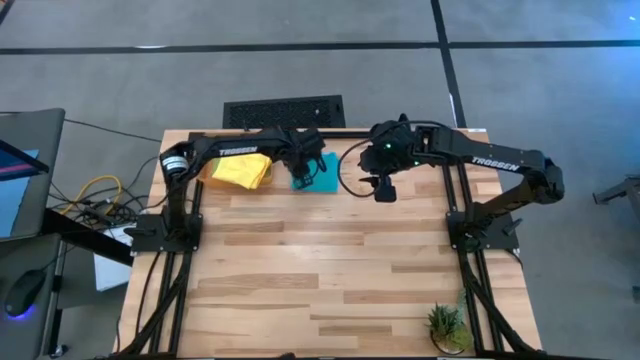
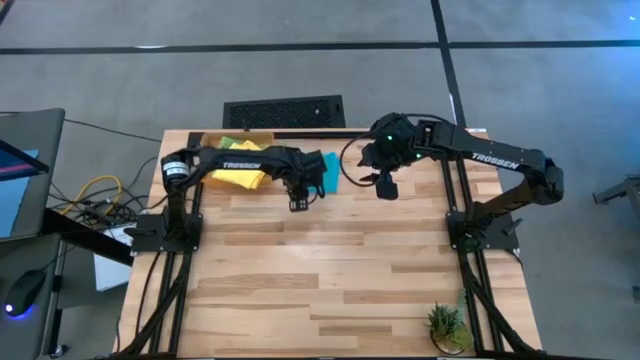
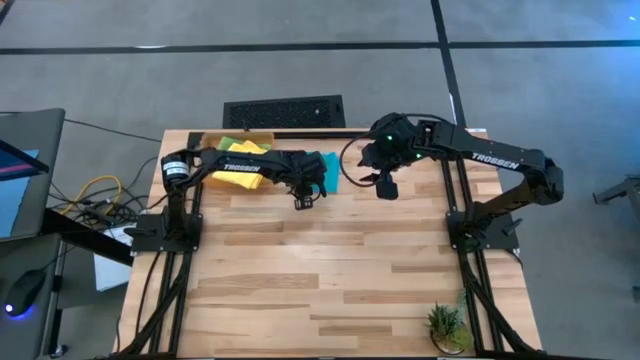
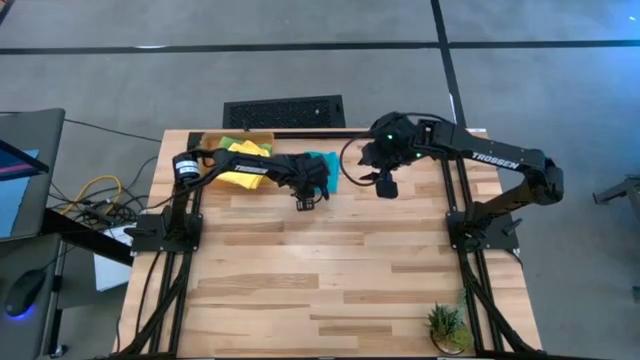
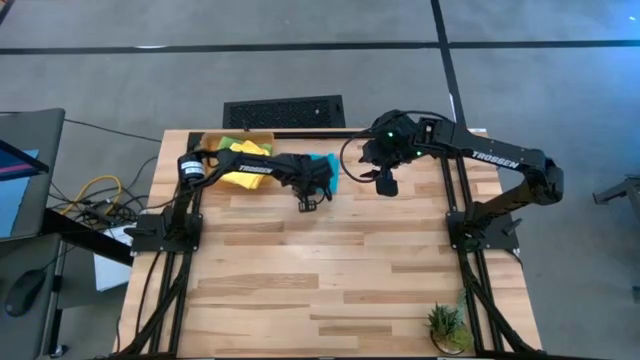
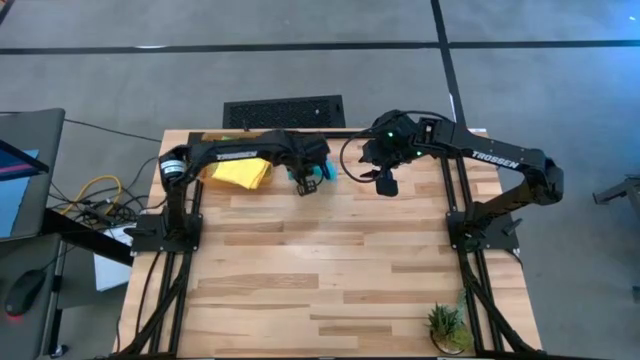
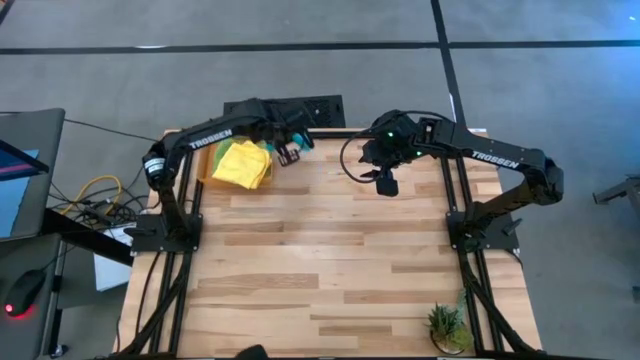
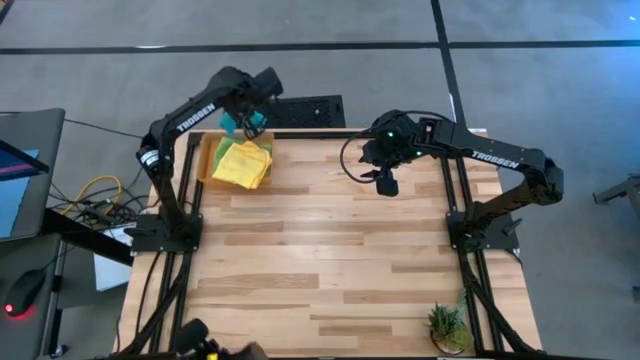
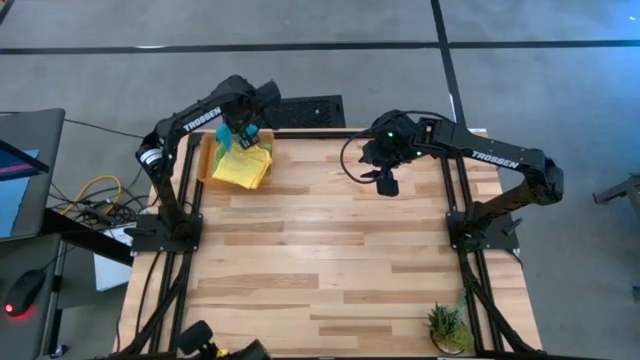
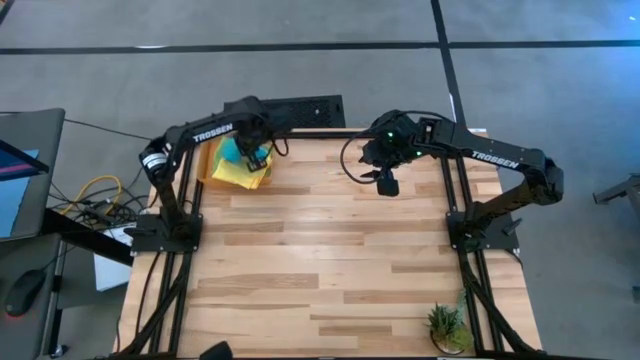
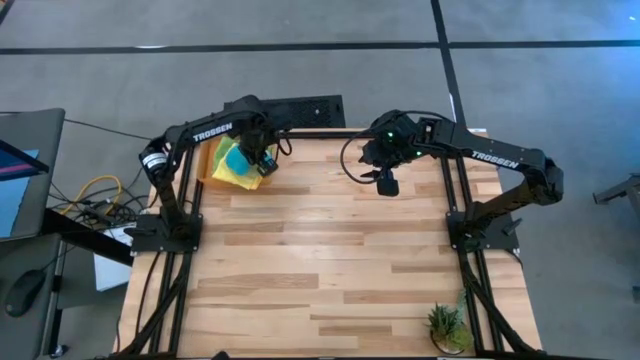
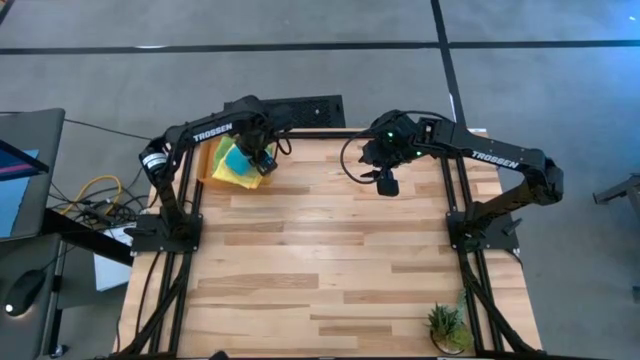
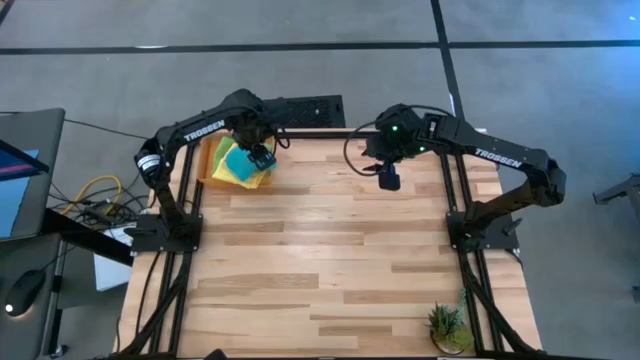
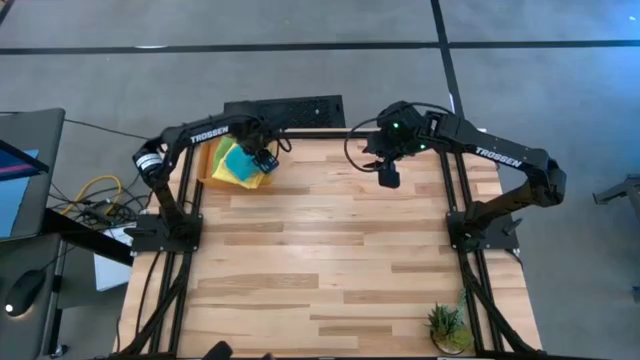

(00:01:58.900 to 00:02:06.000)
Task: Fold microfiber towels
Stack the blue microfiber towel on top of the yellow microfiber towel

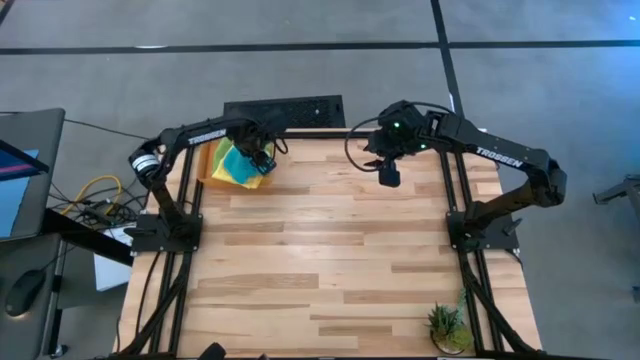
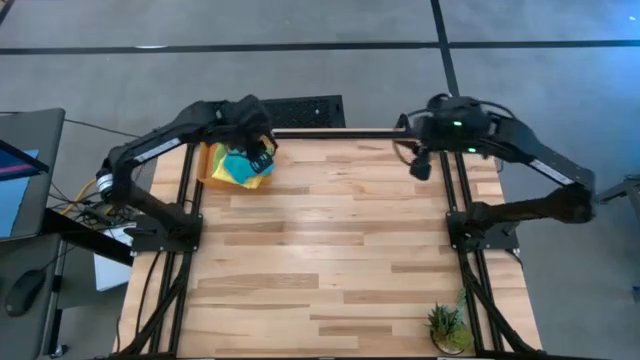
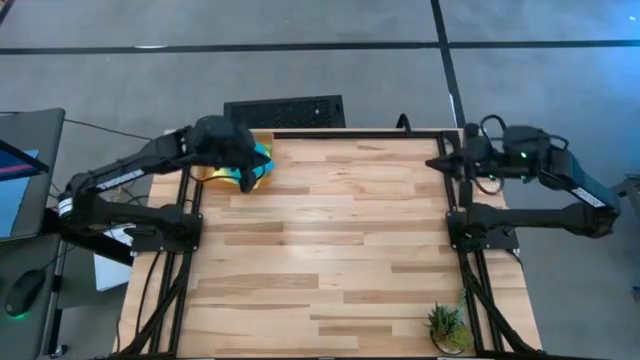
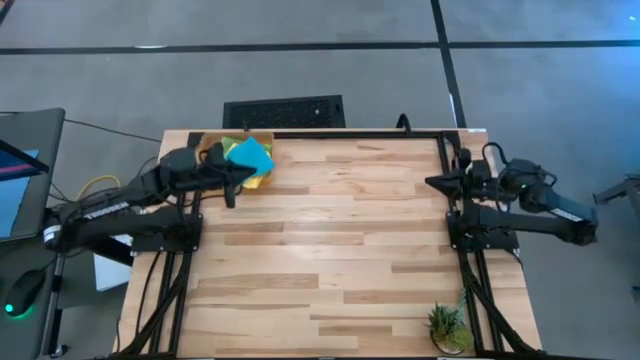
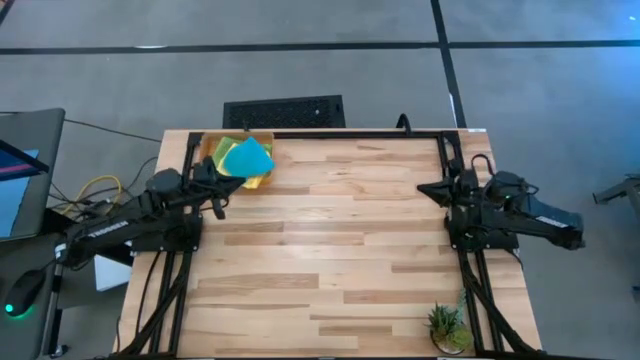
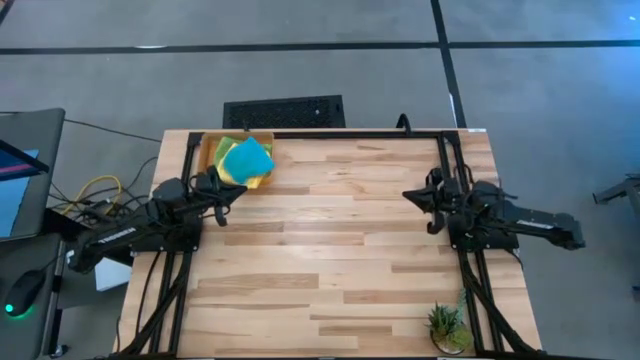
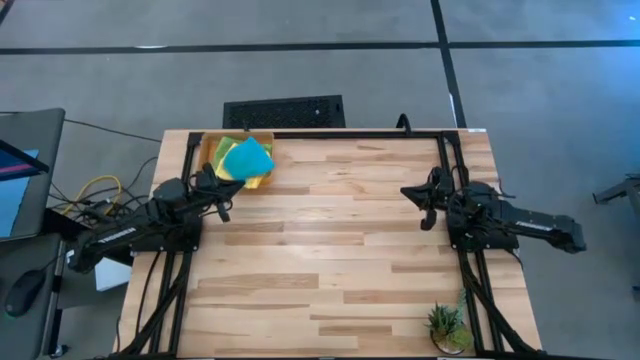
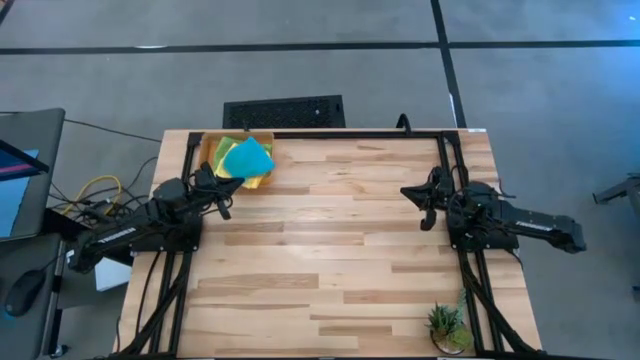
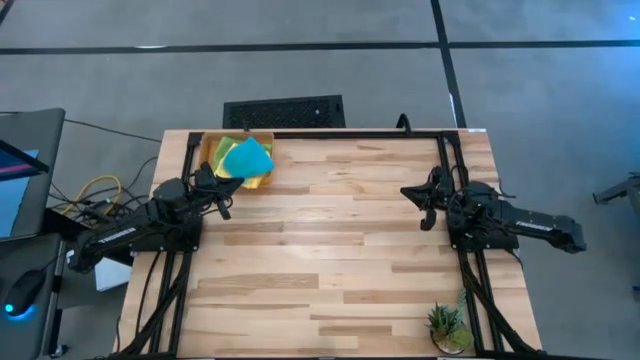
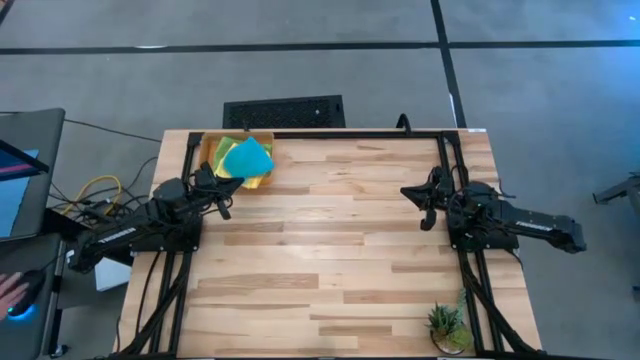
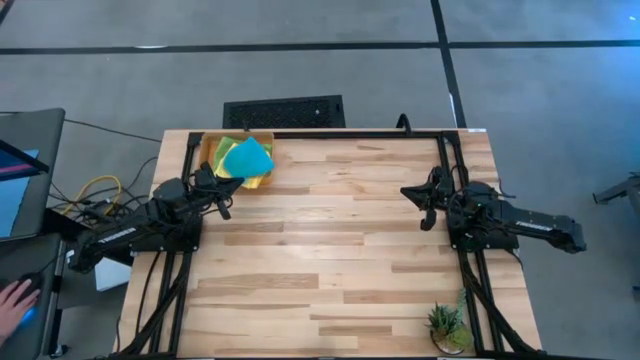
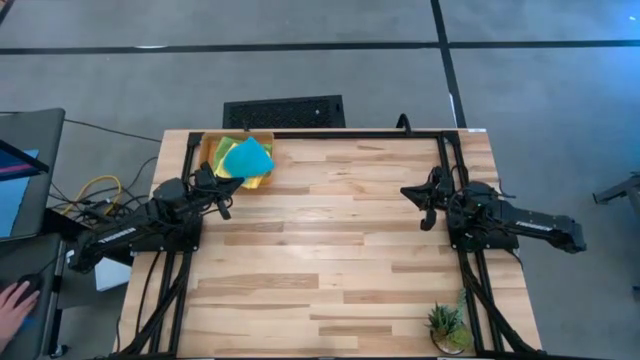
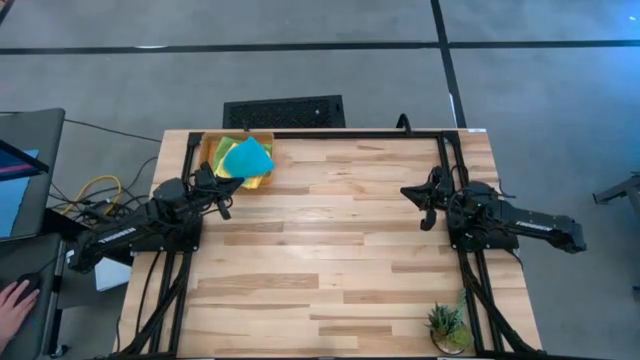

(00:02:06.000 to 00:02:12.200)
Return to Home Position

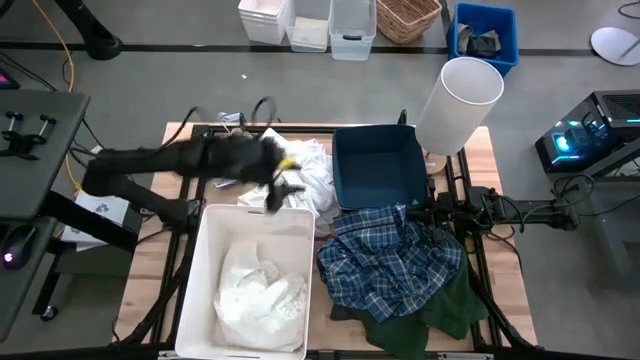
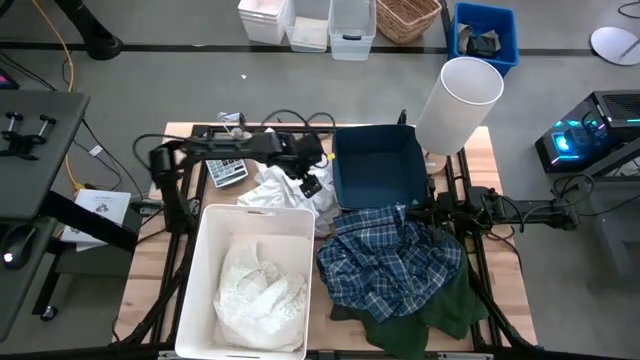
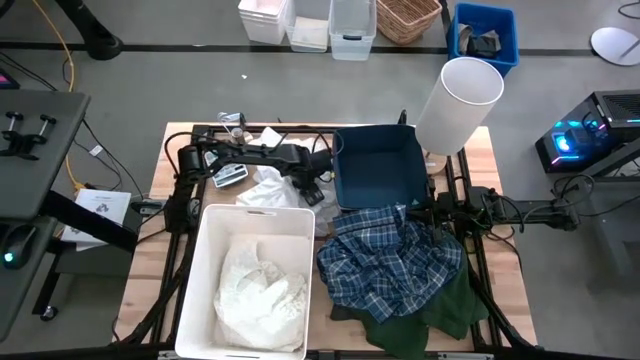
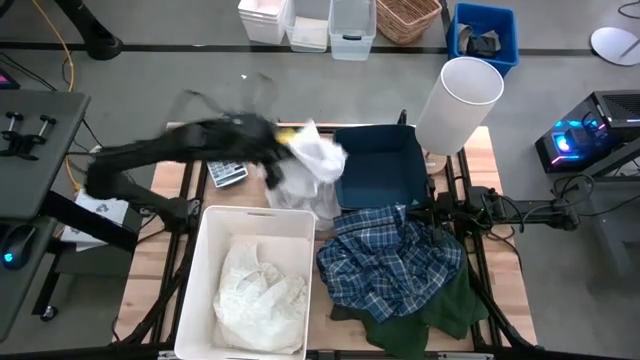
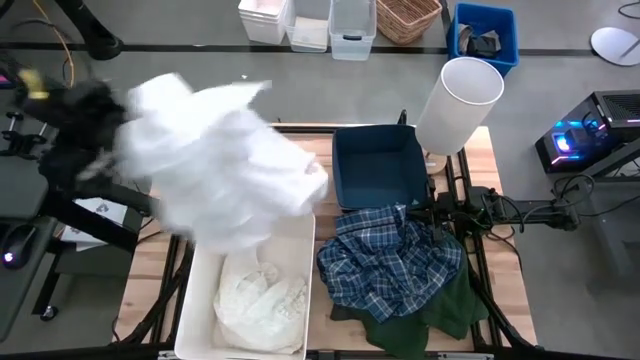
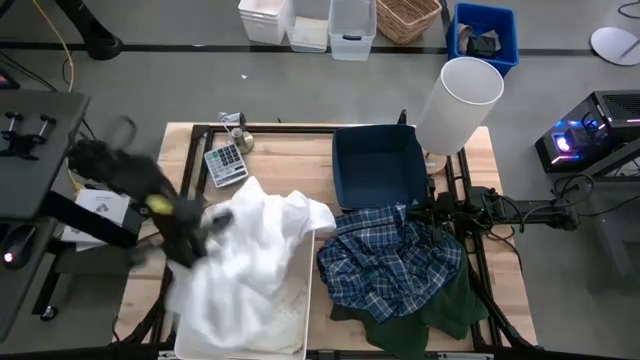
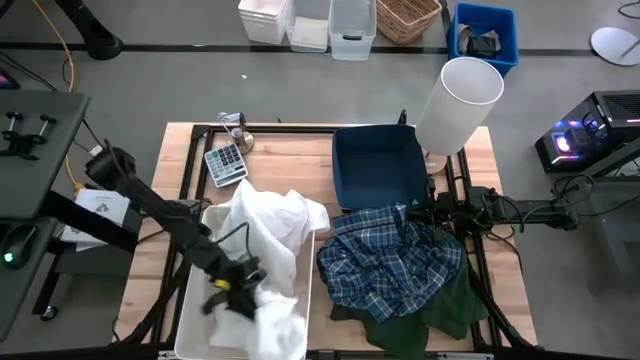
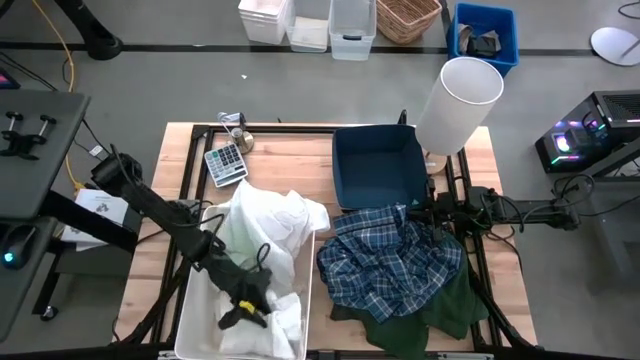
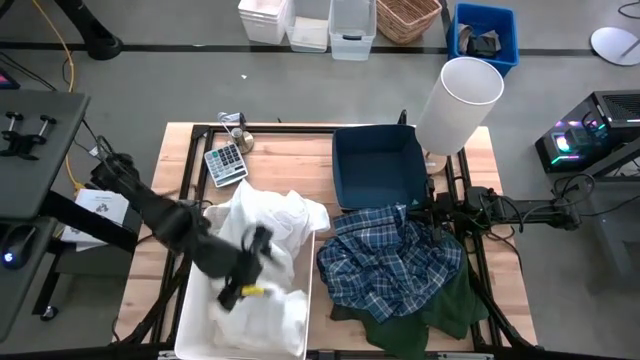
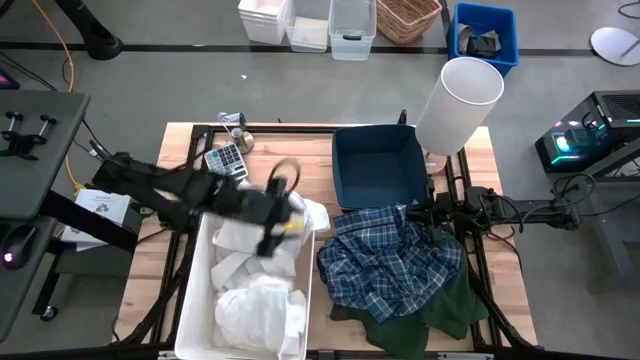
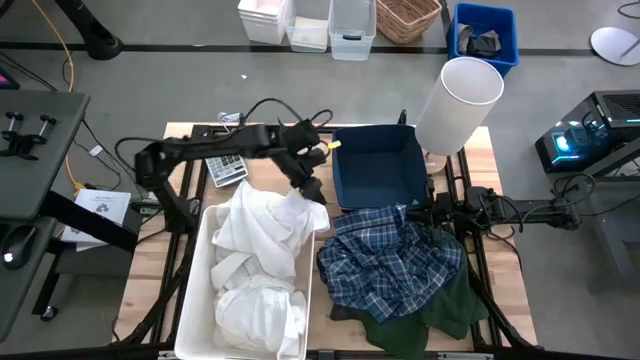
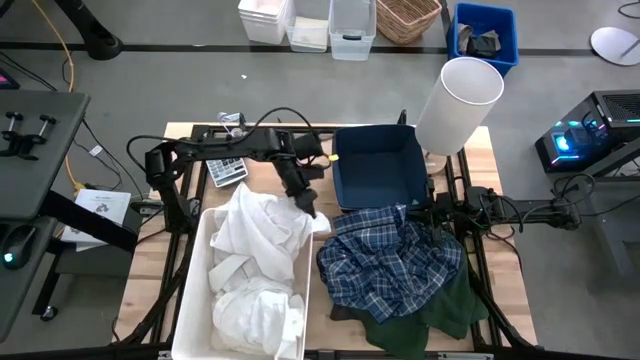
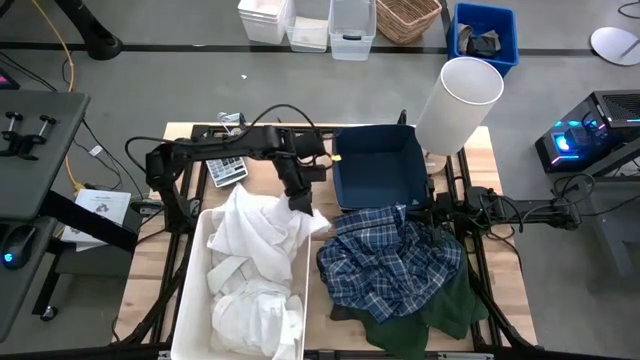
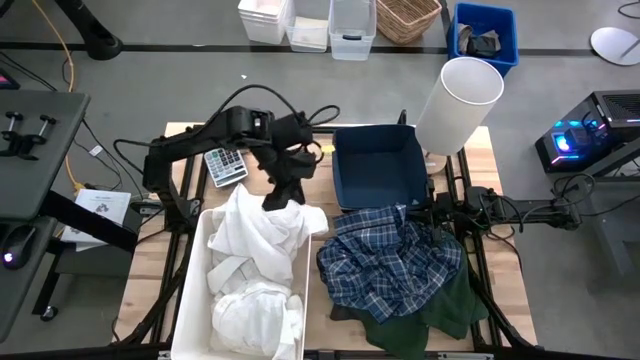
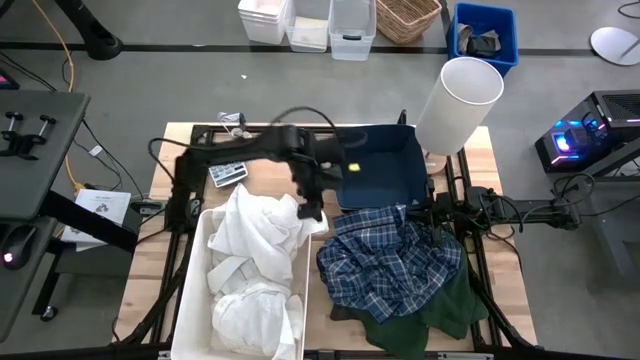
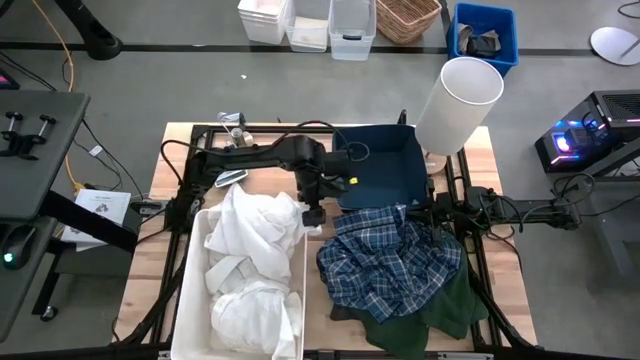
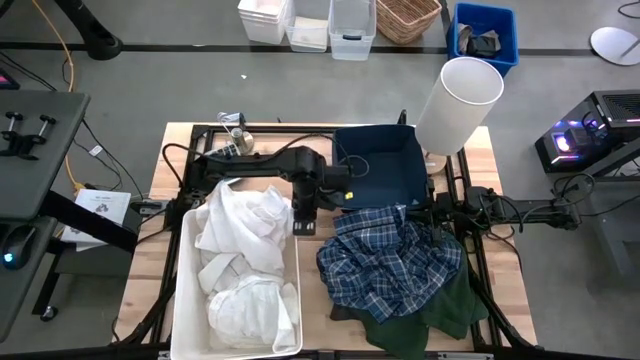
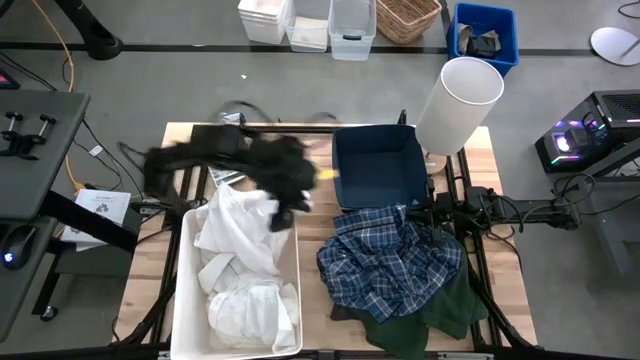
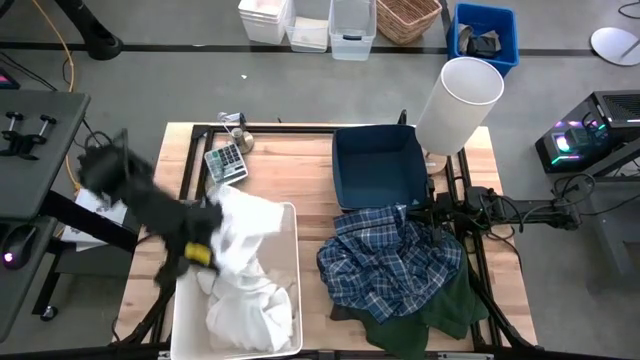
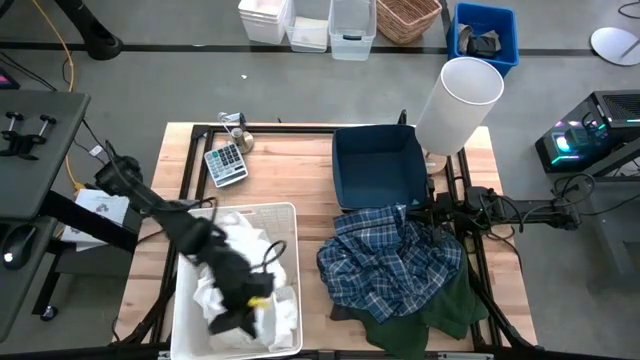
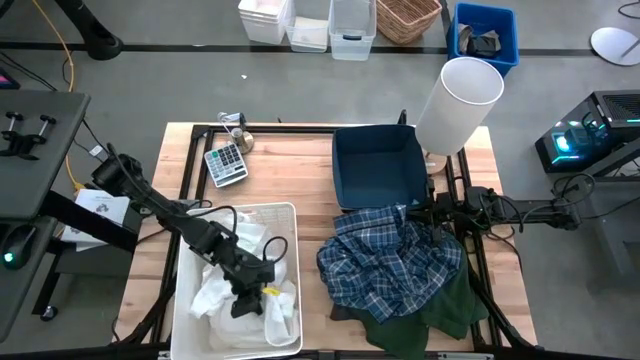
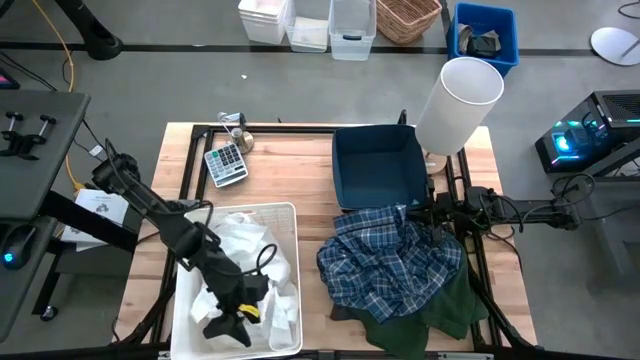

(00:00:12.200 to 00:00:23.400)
Task: Sort clothes
Put the white shirt into the white bin
